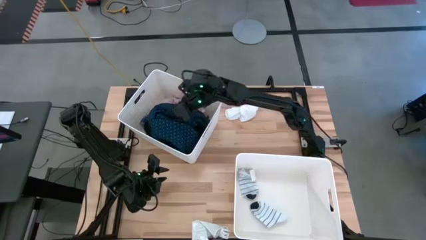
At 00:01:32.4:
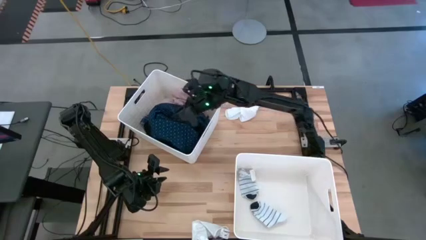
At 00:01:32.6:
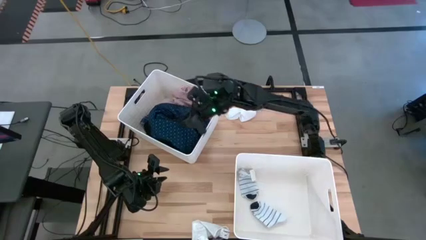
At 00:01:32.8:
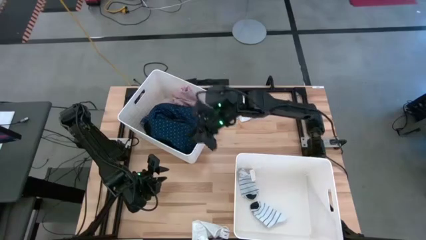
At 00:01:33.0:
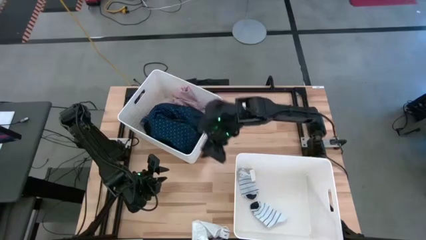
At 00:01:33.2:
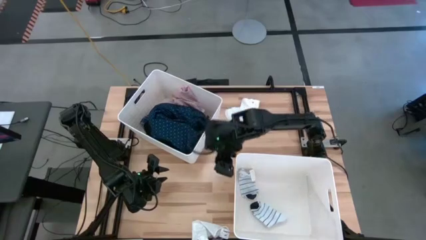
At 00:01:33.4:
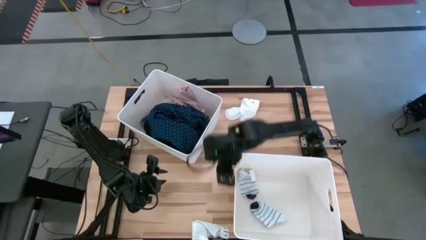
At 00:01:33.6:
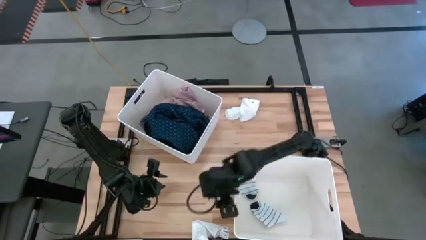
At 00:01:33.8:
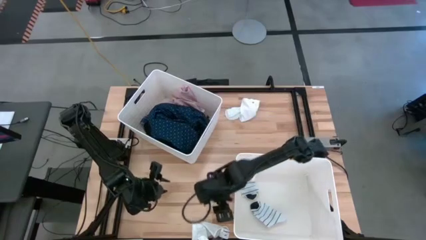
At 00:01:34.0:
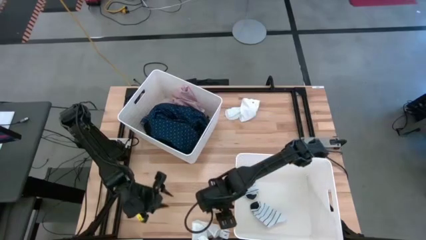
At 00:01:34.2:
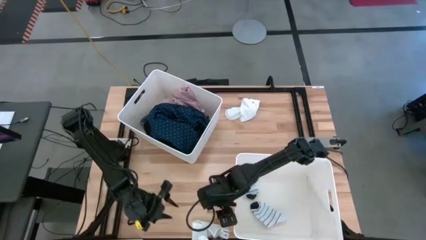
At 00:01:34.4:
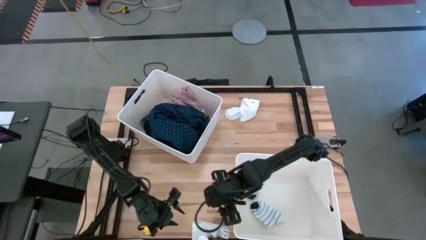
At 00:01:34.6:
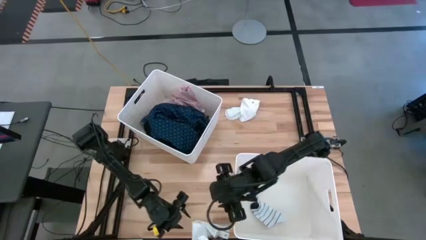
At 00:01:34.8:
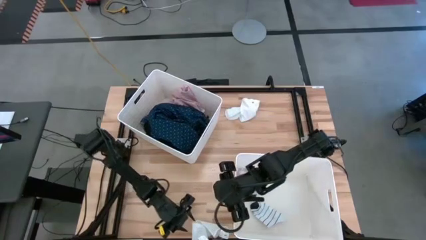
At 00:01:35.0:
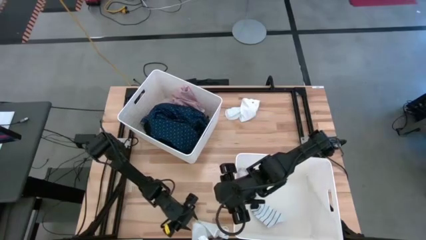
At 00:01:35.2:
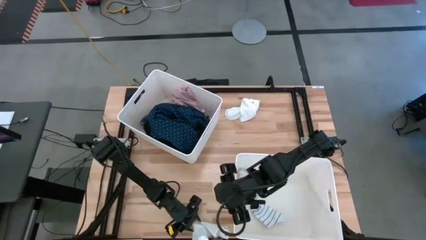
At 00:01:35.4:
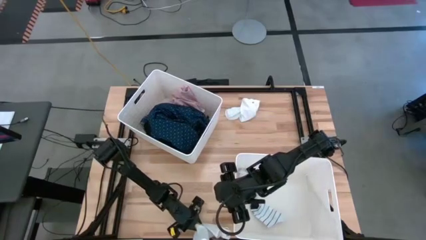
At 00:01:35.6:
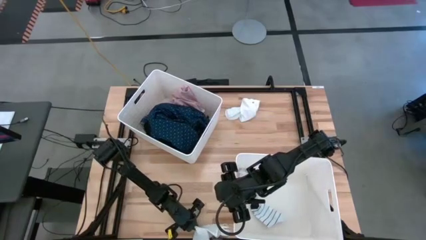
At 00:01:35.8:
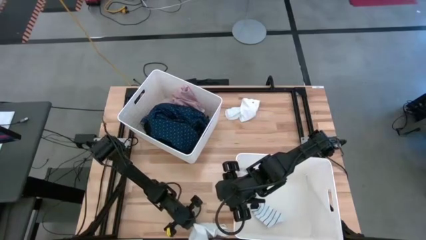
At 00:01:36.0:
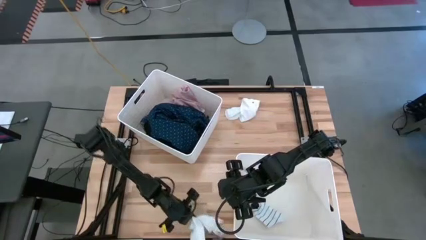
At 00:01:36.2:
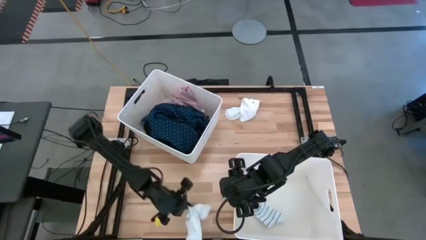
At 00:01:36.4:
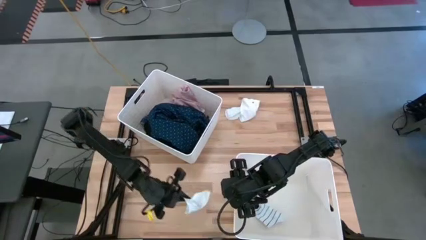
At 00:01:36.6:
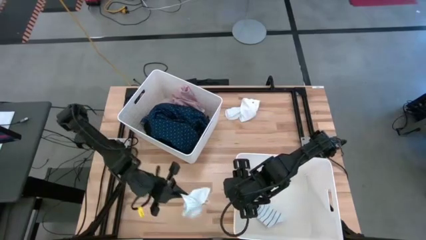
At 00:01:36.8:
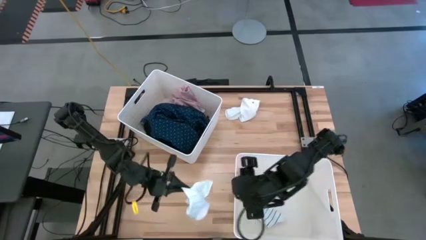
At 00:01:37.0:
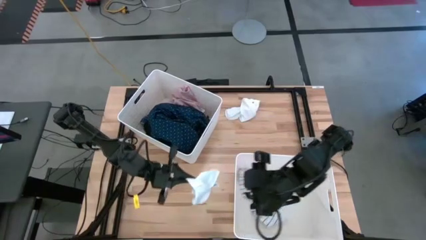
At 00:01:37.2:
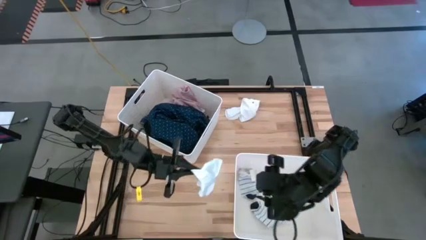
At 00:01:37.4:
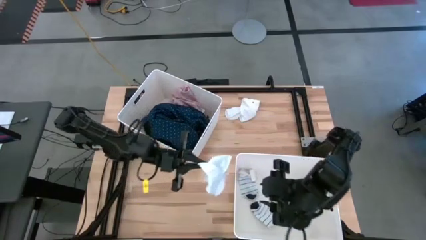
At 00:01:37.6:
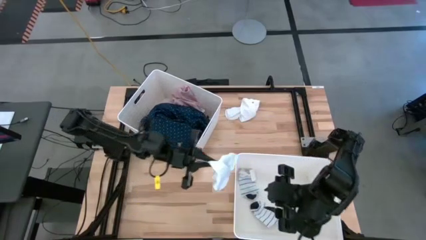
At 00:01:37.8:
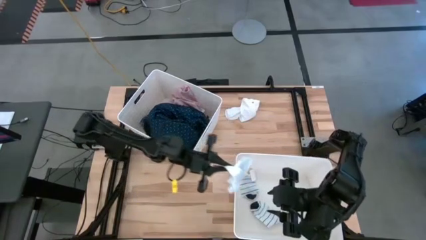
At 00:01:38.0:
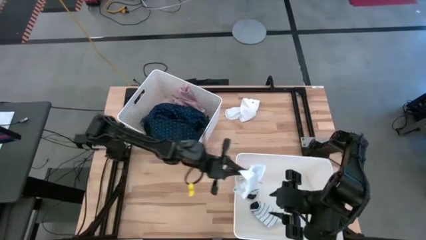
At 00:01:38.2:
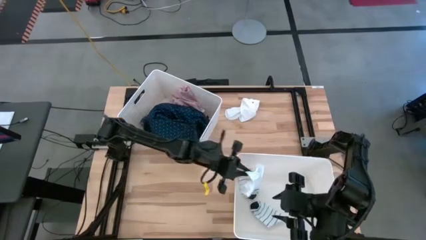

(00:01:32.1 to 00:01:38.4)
Task: Sort clothes
Put the bottom white sock into the bottom white laundry bin

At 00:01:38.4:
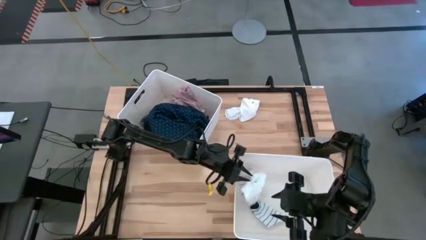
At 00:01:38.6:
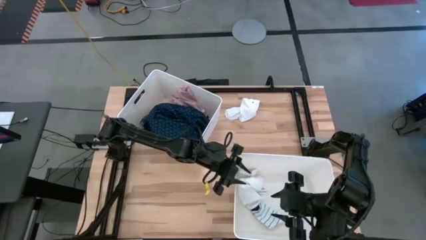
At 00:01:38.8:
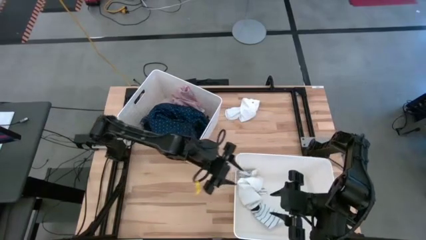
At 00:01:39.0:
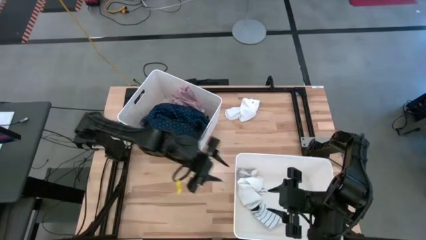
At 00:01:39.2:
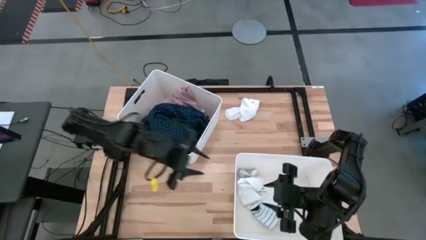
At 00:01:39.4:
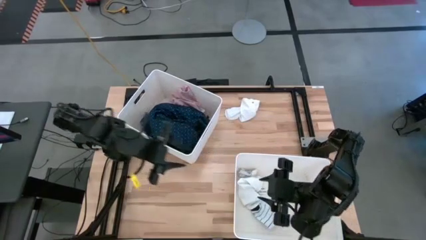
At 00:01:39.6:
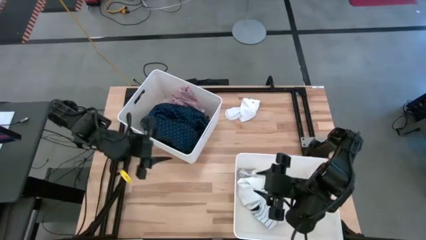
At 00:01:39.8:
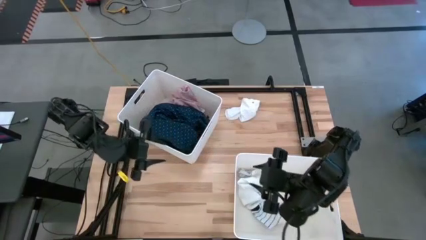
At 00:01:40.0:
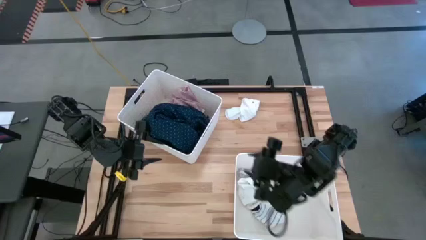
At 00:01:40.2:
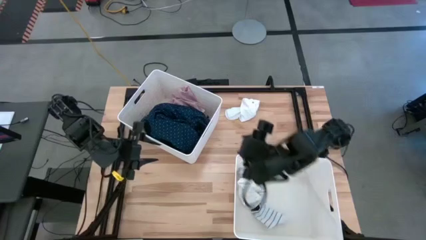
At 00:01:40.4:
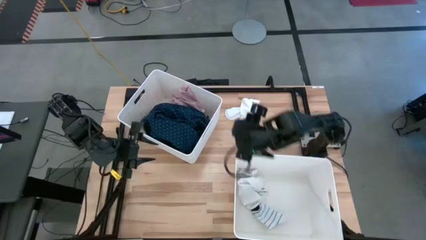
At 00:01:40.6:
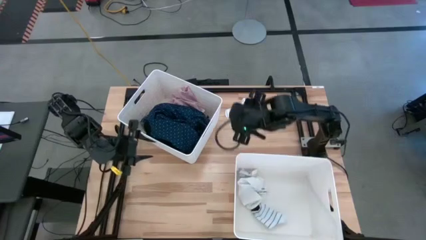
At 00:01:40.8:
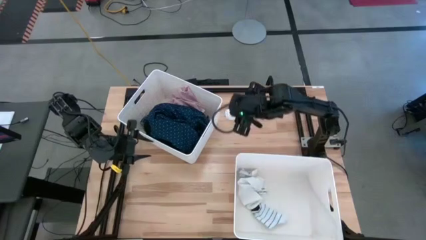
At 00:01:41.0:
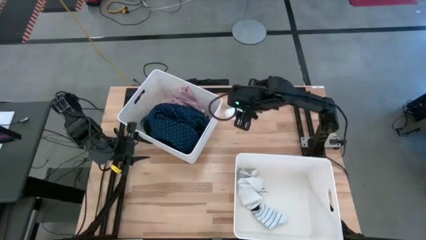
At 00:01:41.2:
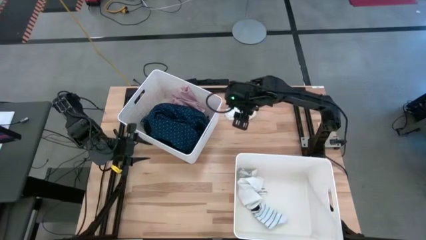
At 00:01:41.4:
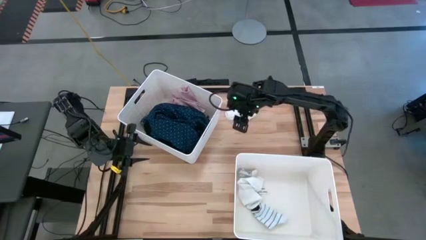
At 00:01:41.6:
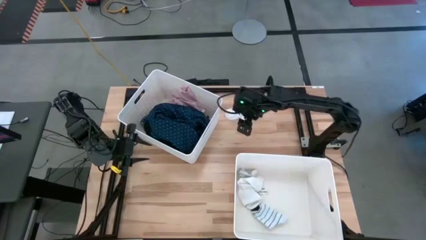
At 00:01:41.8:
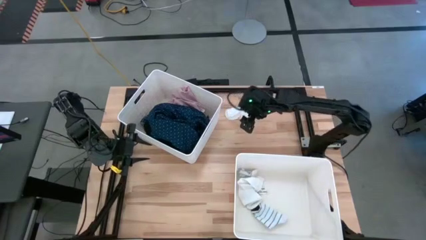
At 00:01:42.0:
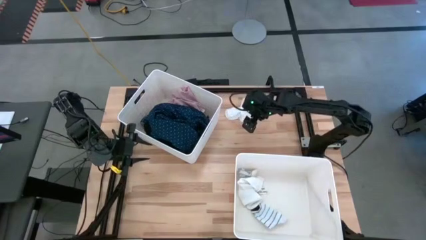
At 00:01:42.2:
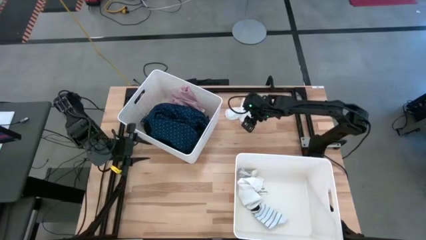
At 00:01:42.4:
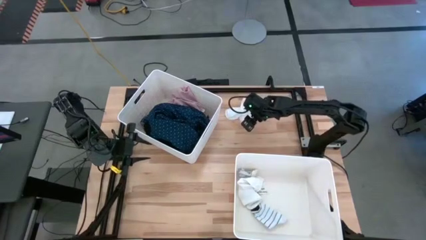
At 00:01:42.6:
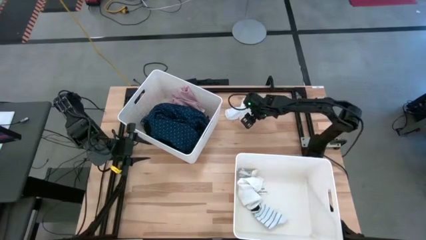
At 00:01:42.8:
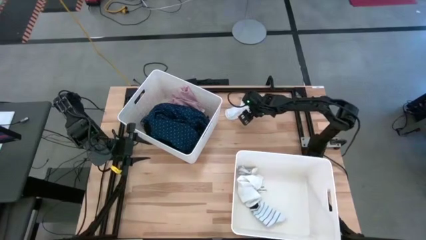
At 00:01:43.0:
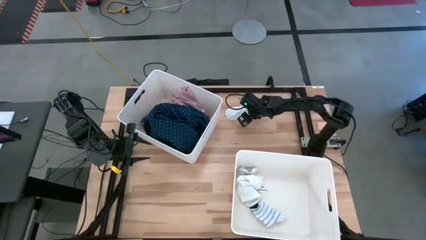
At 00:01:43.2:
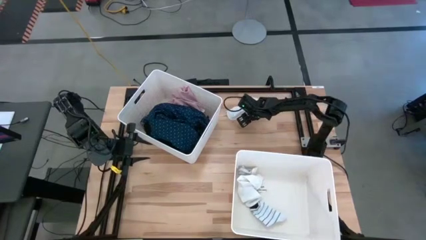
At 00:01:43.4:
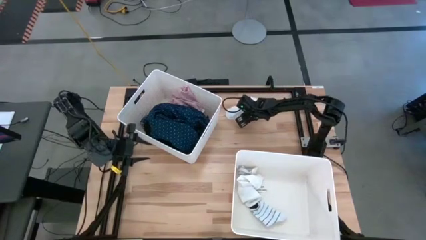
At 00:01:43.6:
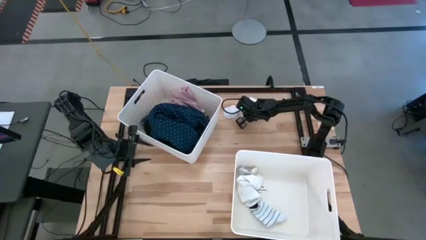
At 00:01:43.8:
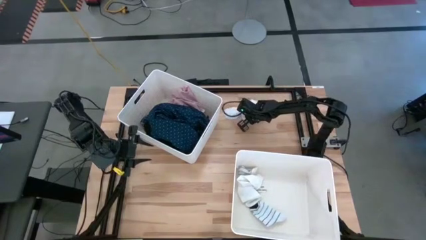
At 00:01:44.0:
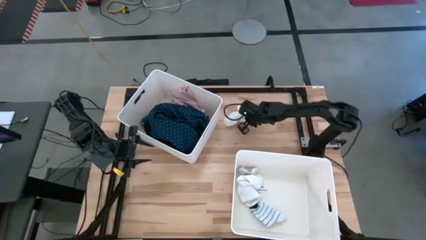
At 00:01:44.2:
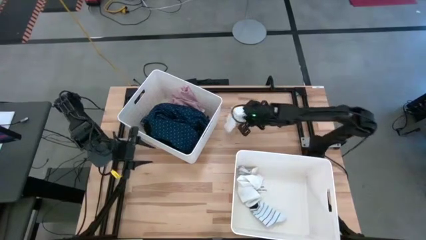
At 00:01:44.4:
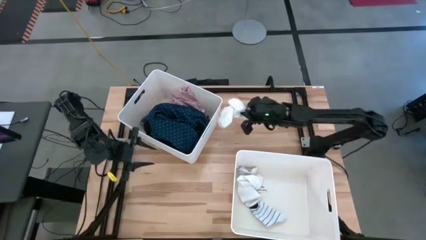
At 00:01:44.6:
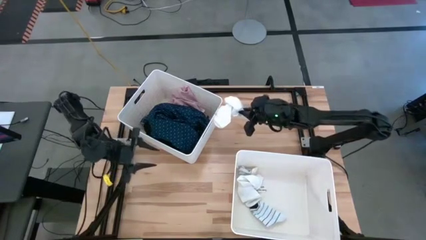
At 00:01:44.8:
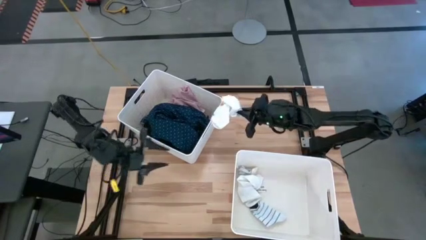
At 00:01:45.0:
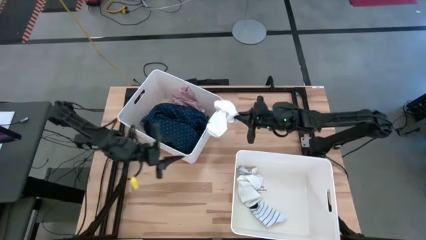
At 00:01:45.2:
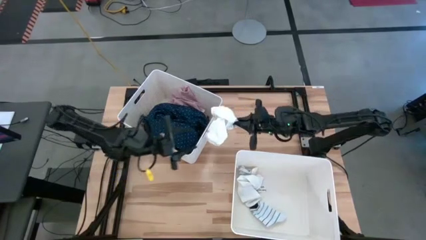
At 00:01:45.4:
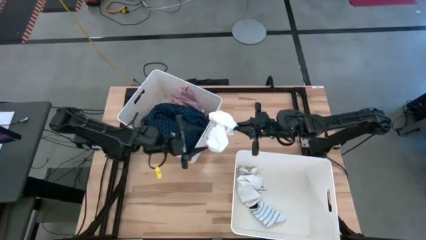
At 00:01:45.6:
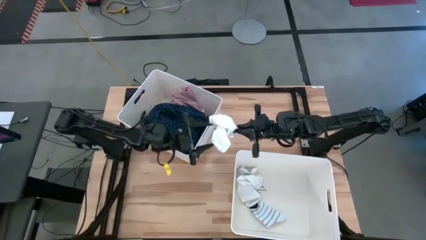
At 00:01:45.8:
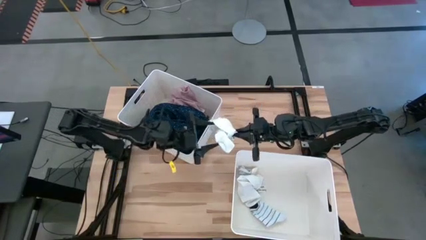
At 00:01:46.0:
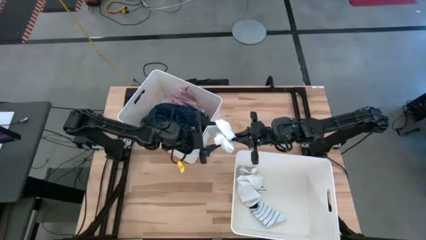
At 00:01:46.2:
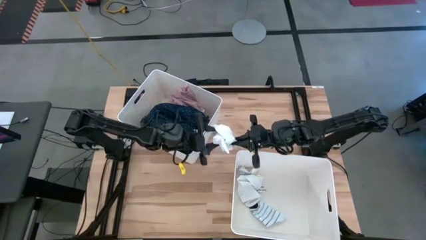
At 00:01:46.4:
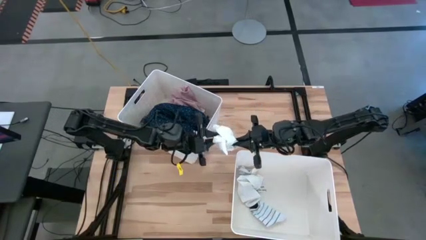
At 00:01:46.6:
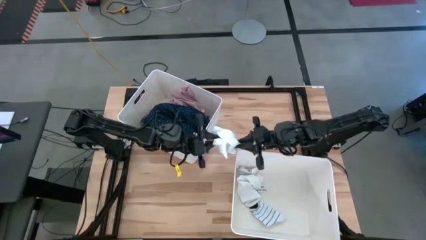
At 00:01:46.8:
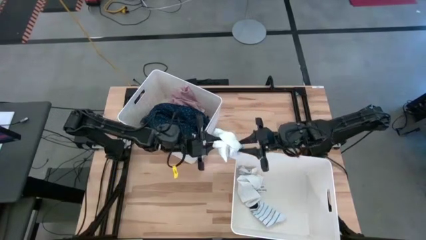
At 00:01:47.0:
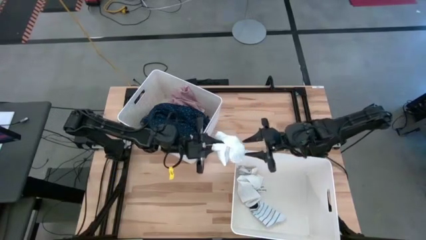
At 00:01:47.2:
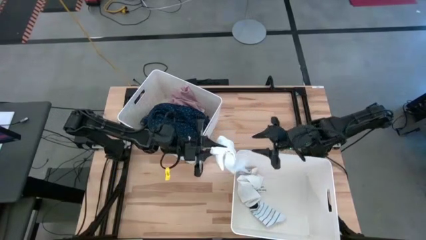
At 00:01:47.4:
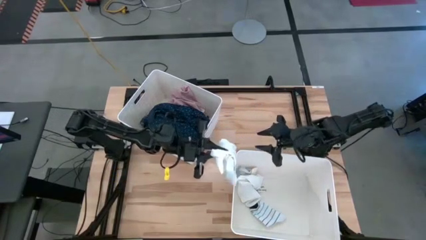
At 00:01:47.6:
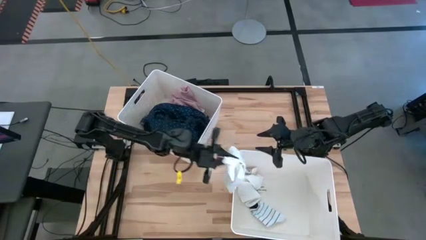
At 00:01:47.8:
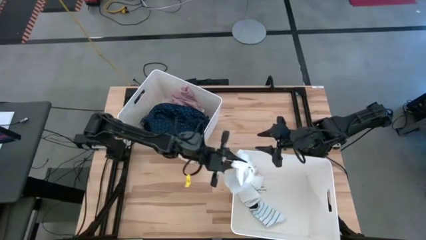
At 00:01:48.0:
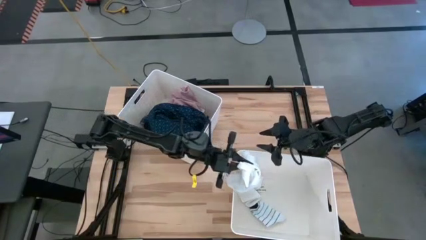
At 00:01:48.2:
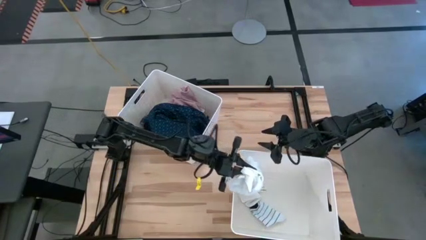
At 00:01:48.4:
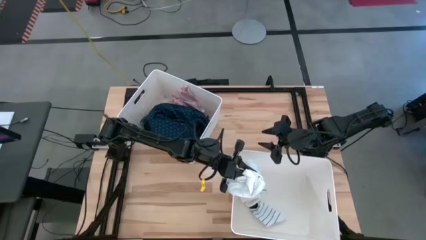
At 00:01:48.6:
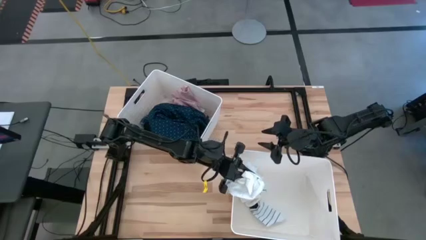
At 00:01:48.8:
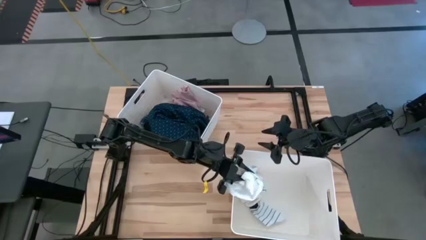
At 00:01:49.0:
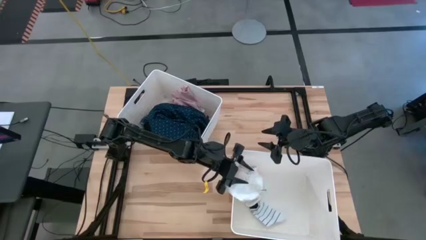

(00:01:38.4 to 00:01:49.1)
Put the white sock into the bottom white laundry bin
